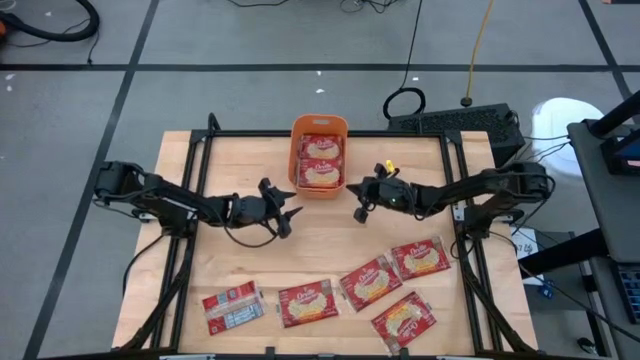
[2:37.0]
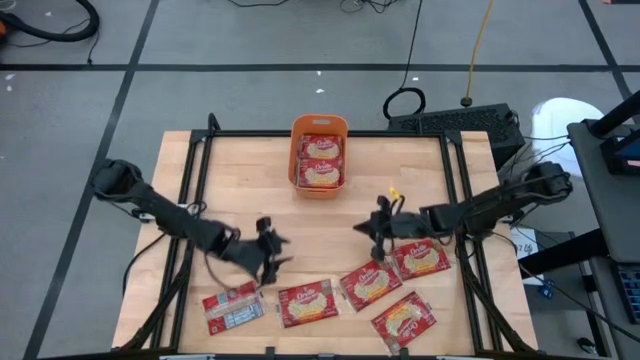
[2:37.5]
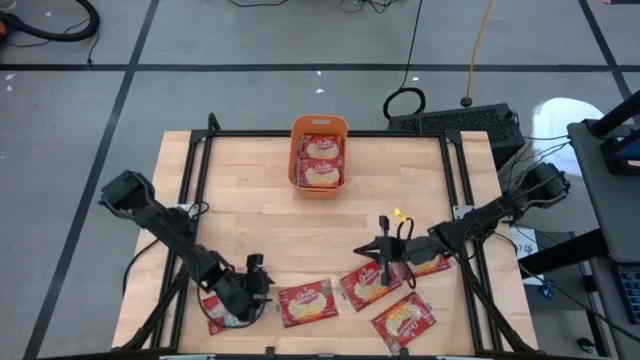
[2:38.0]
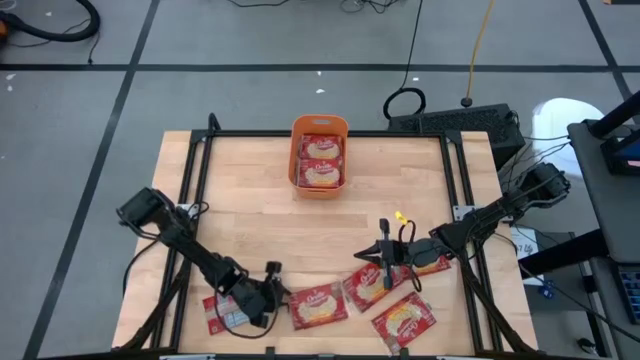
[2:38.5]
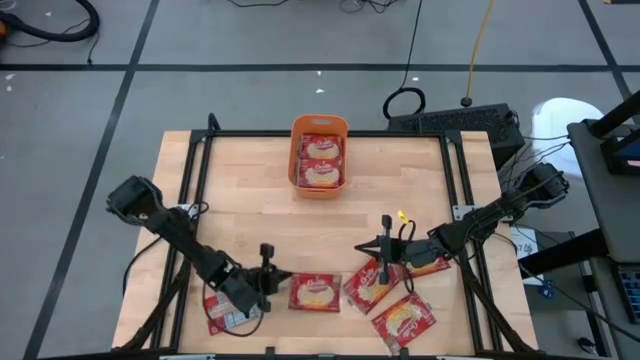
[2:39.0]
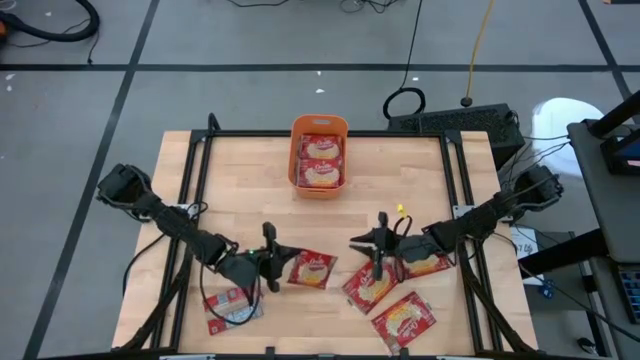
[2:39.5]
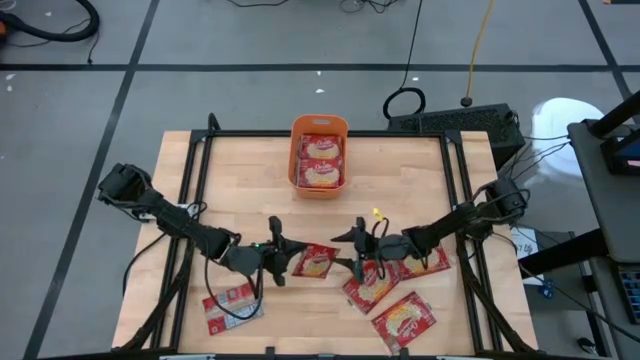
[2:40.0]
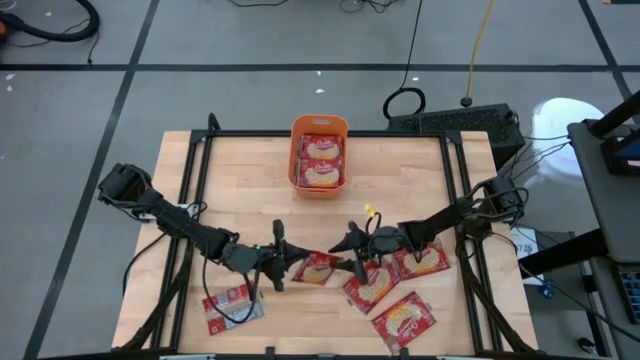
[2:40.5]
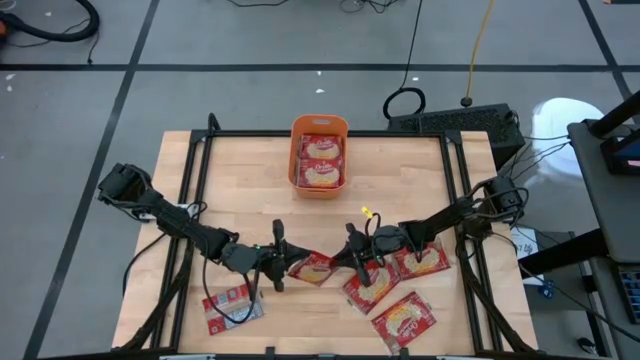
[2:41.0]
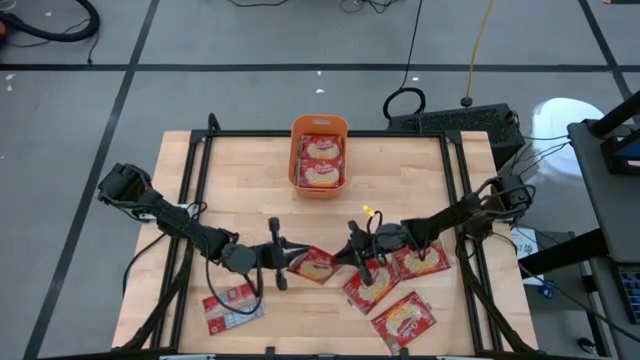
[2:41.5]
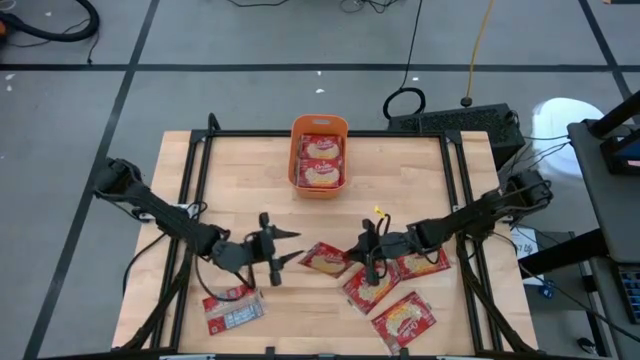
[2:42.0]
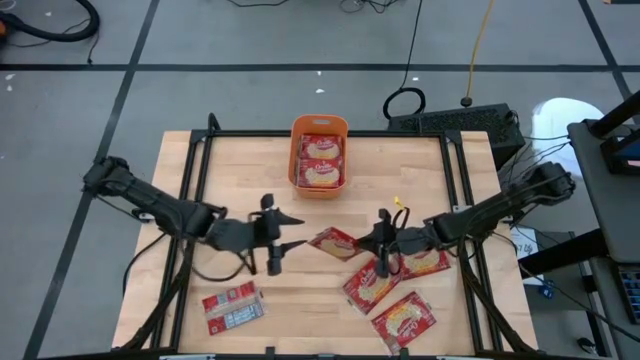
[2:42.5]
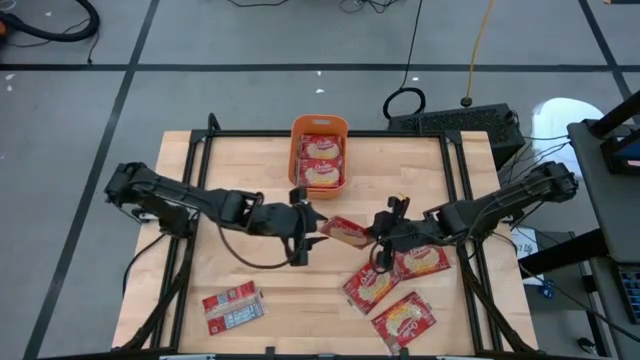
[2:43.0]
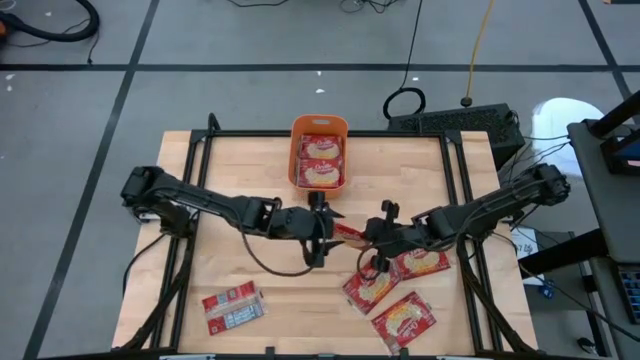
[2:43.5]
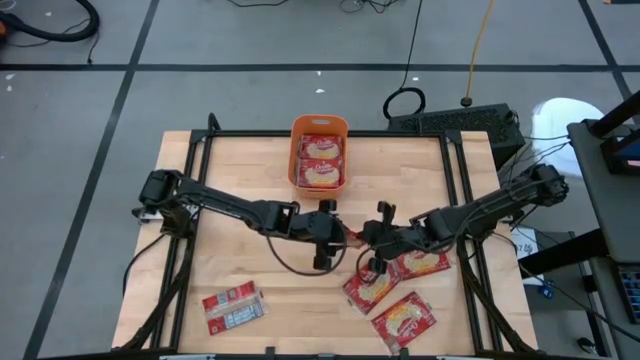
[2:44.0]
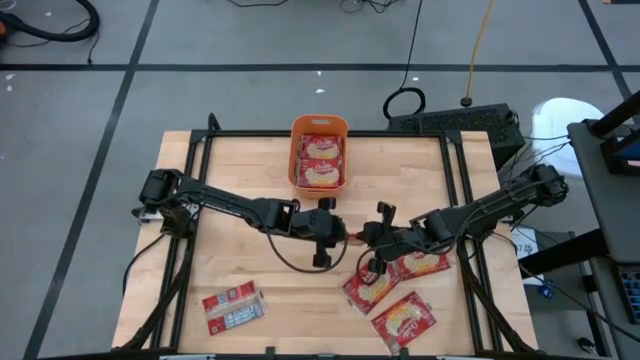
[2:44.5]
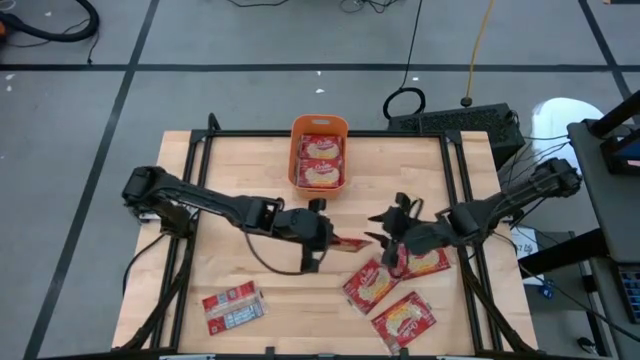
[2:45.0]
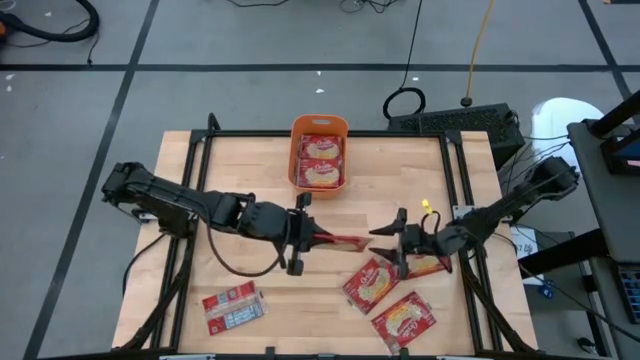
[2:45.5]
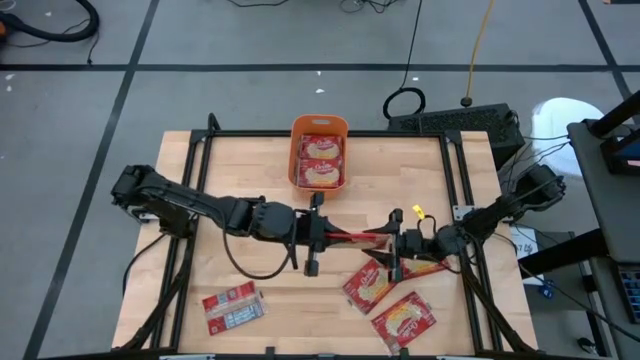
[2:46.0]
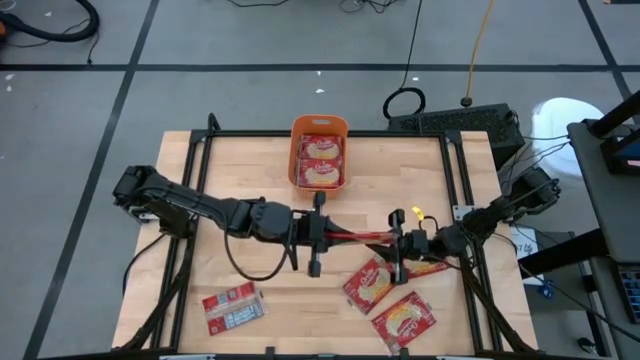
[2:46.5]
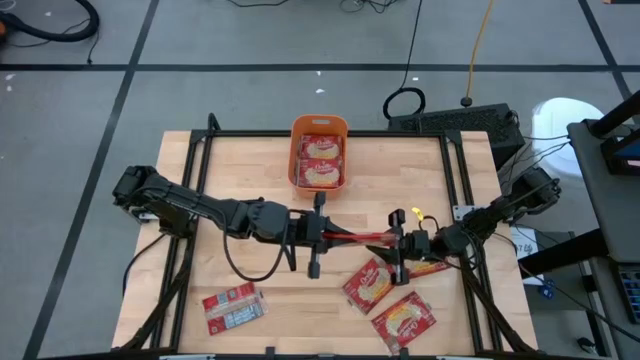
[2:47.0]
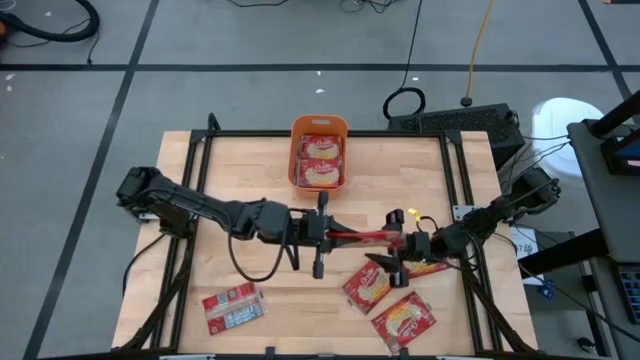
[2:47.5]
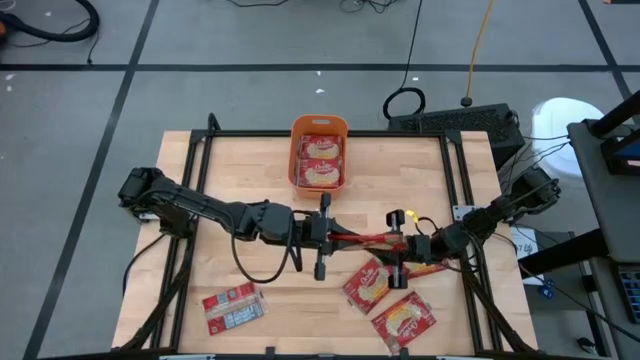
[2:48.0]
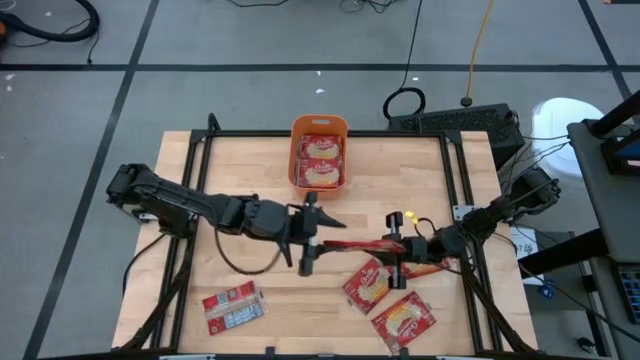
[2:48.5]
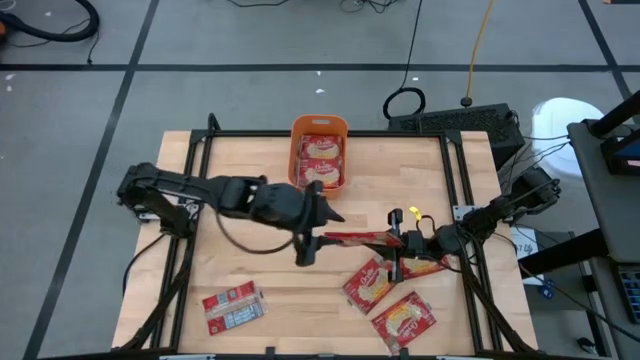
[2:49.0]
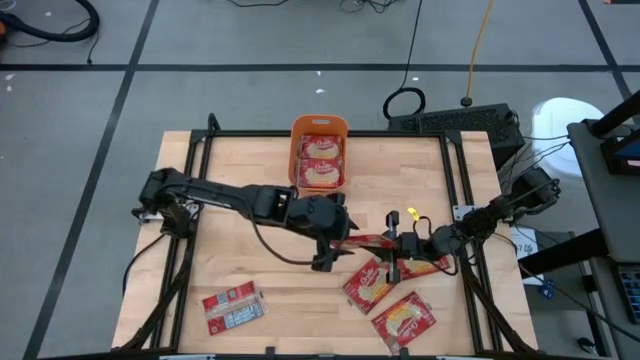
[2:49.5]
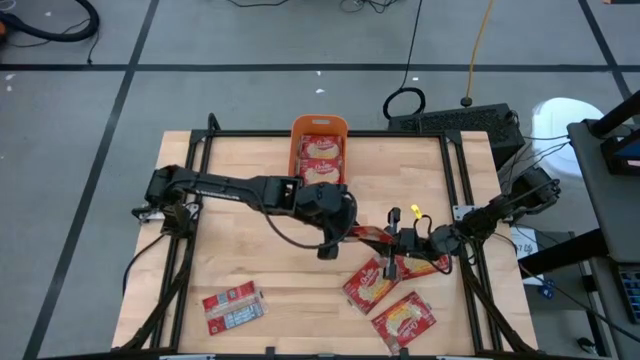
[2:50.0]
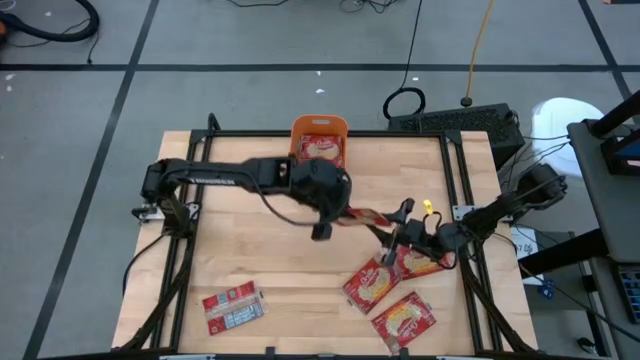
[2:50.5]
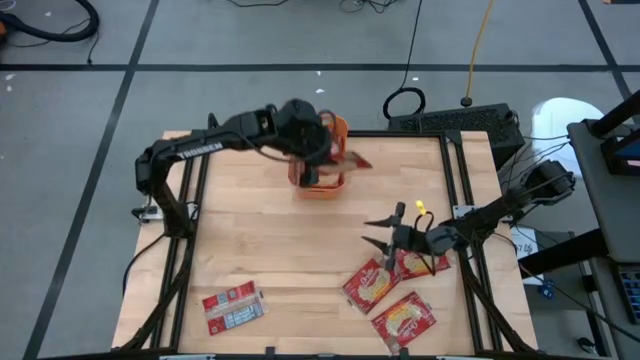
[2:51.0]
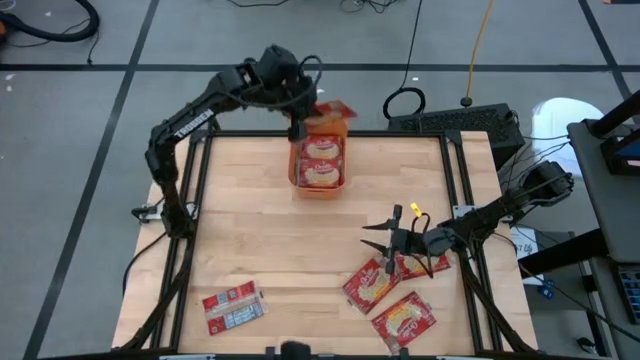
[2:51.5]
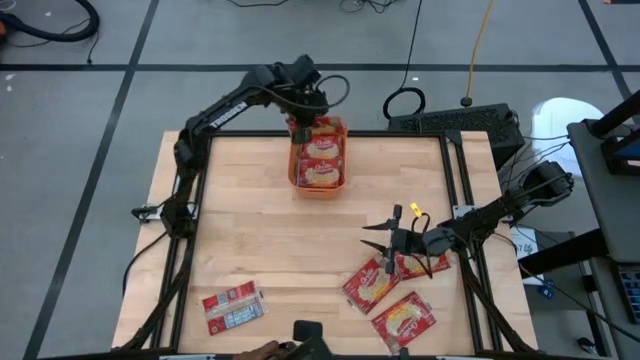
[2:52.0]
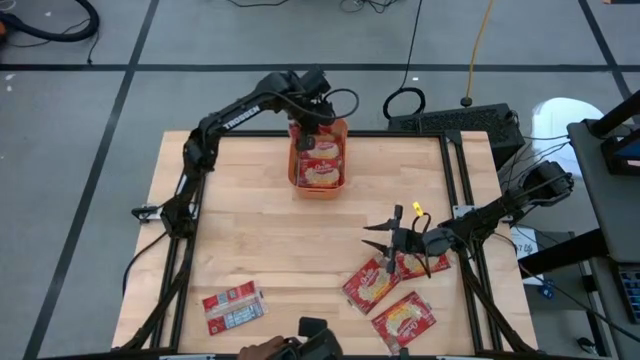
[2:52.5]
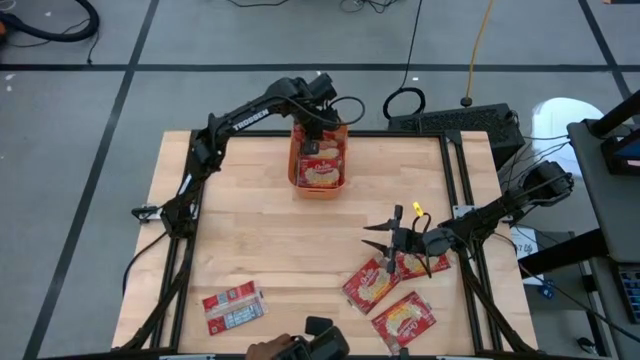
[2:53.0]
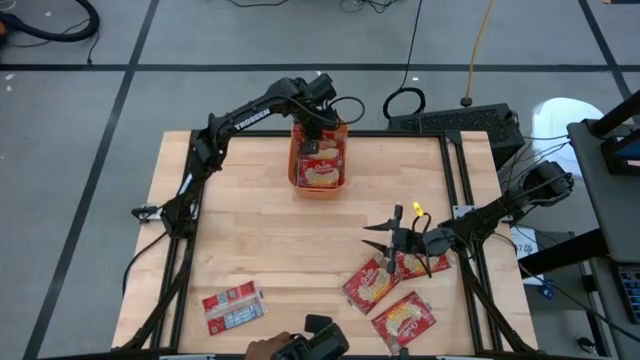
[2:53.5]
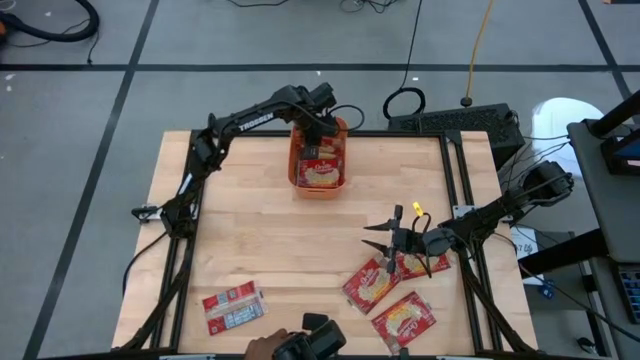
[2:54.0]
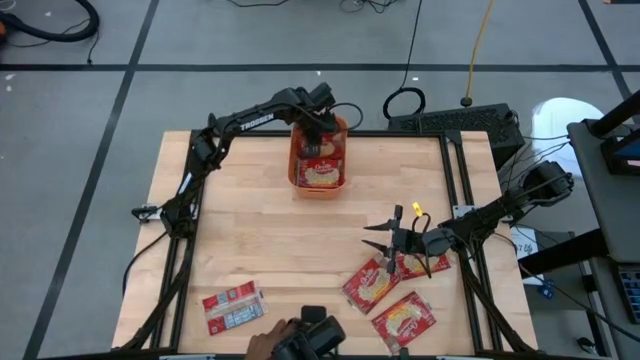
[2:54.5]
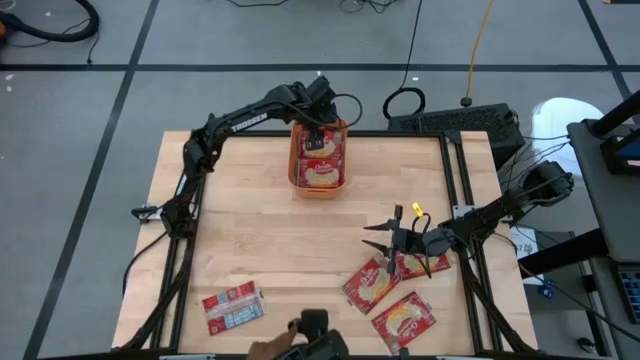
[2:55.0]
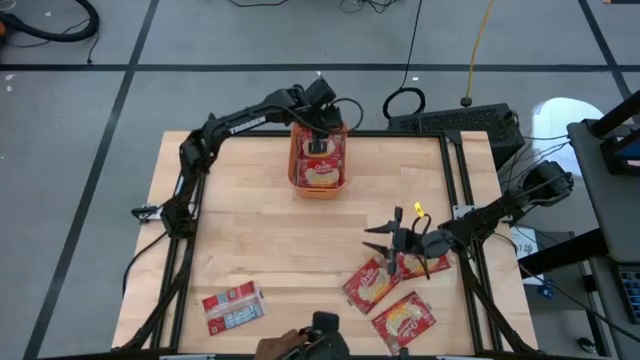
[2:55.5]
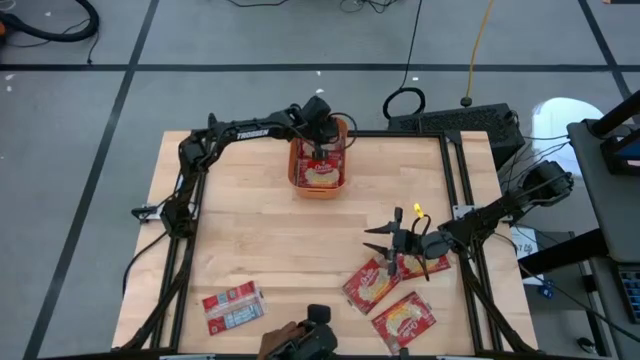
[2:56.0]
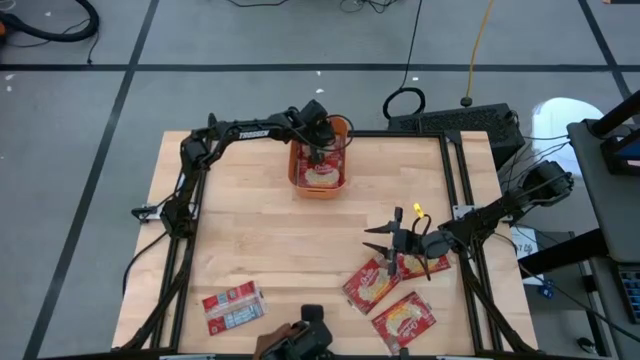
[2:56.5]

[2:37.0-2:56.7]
Task: Sort popcorn bags into baskets
Put the red popcorn bag into the orange bin

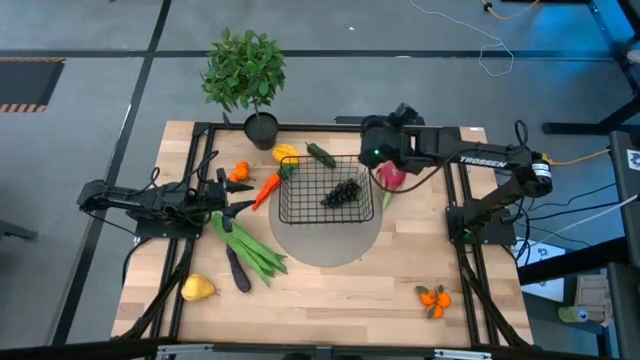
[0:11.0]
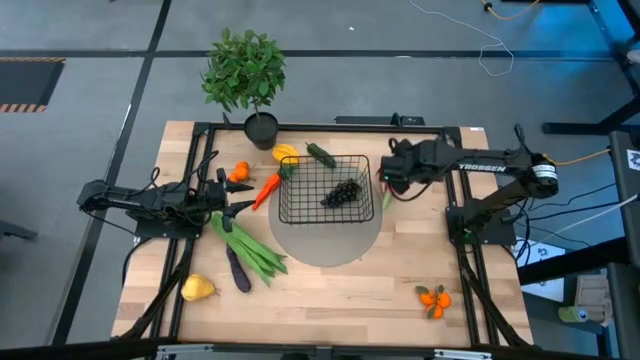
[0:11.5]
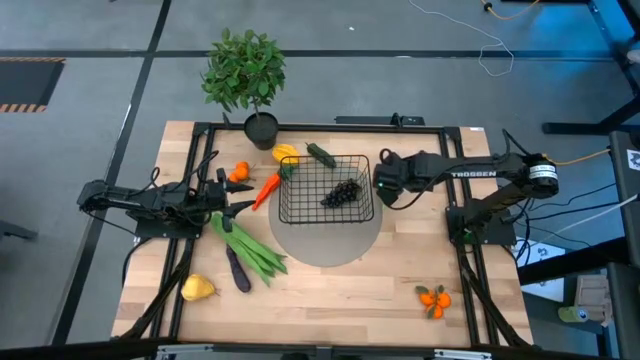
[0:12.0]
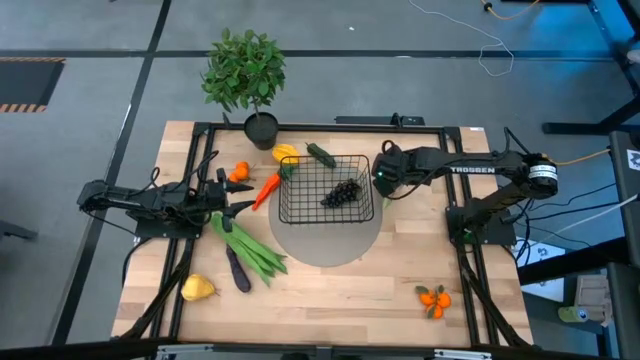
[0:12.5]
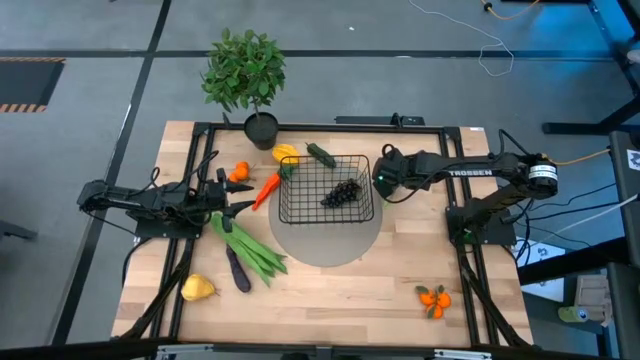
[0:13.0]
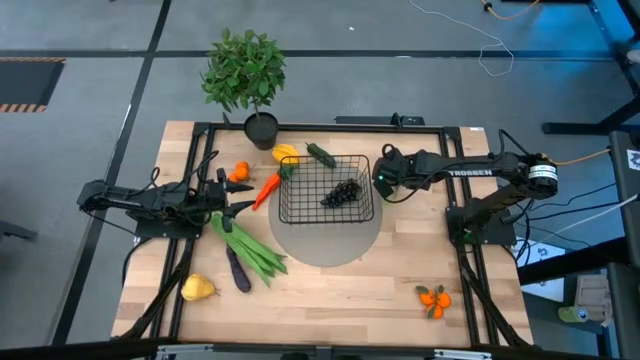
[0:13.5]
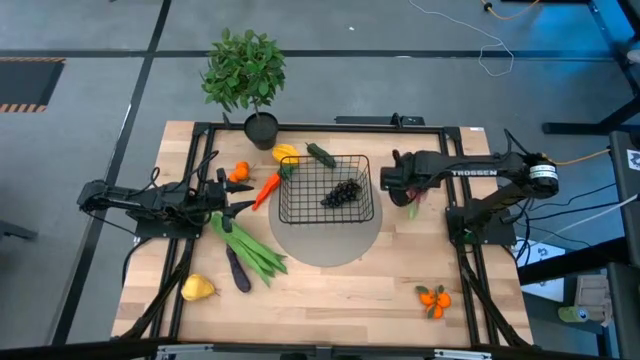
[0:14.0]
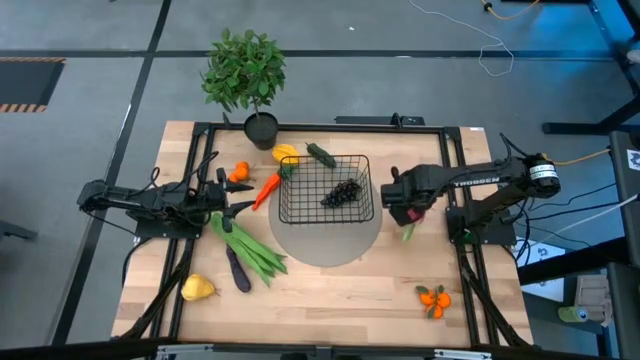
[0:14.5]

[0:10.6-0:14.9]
Task: Build produce basket
Move the dragon fruit to the middle right side of the table
